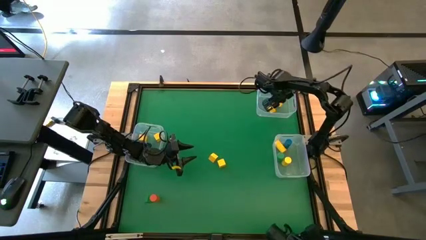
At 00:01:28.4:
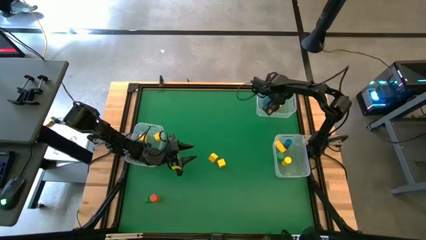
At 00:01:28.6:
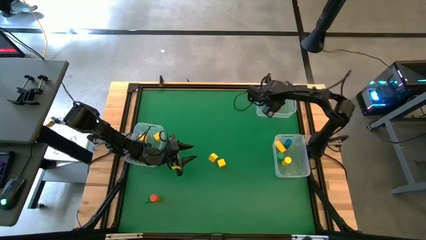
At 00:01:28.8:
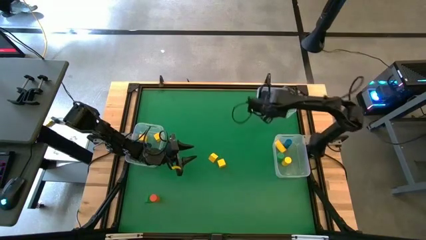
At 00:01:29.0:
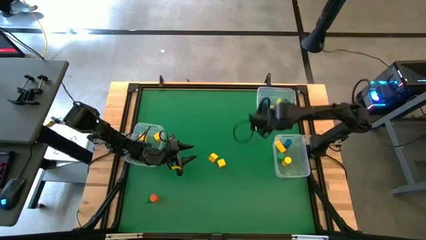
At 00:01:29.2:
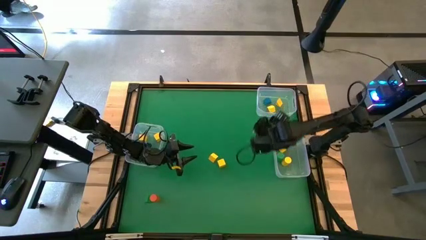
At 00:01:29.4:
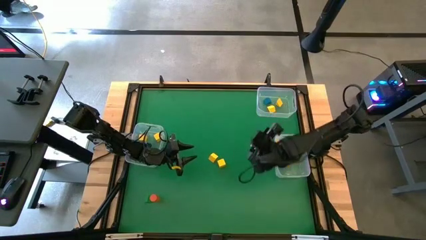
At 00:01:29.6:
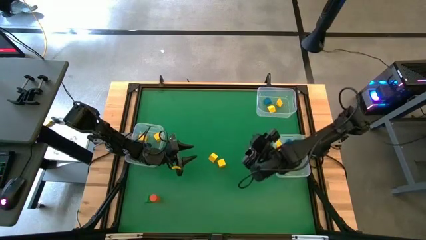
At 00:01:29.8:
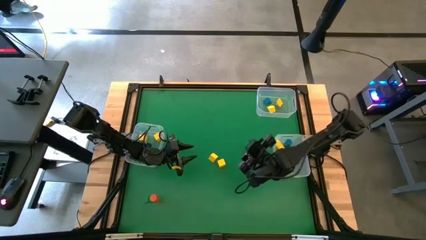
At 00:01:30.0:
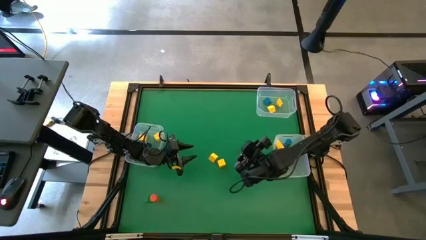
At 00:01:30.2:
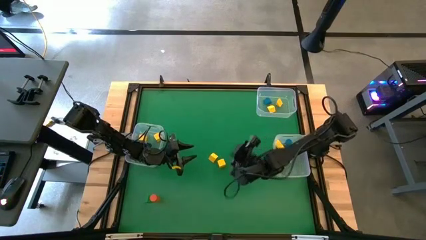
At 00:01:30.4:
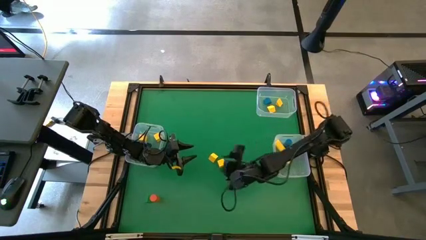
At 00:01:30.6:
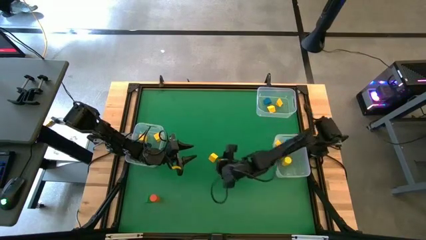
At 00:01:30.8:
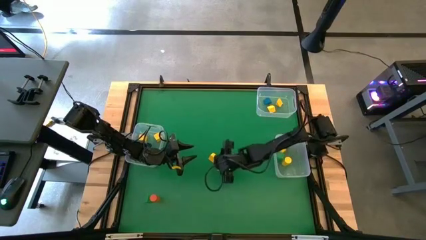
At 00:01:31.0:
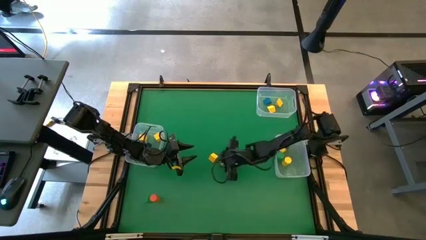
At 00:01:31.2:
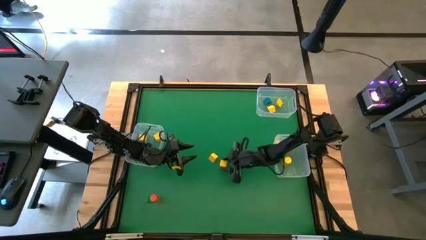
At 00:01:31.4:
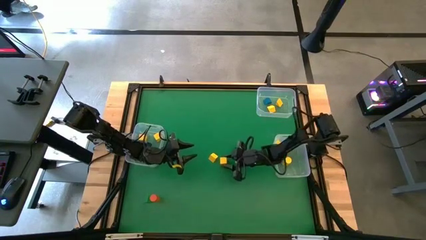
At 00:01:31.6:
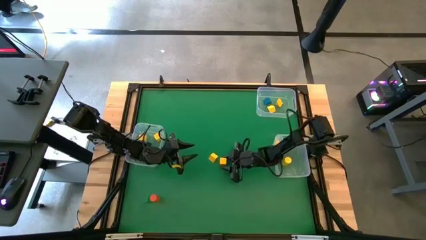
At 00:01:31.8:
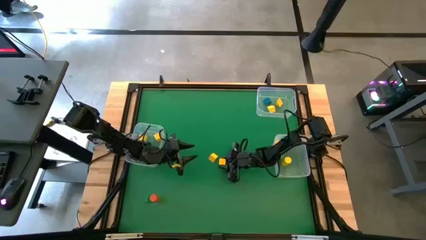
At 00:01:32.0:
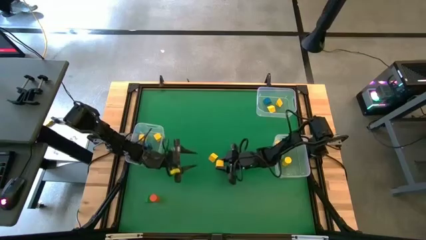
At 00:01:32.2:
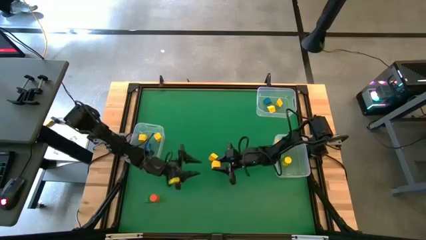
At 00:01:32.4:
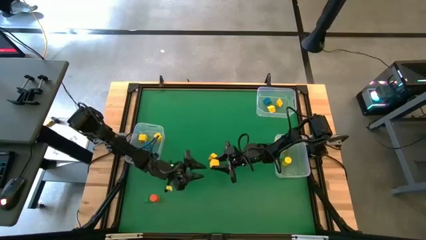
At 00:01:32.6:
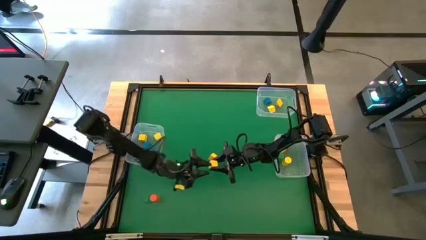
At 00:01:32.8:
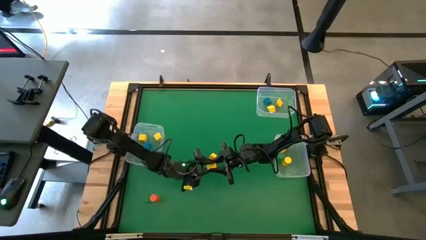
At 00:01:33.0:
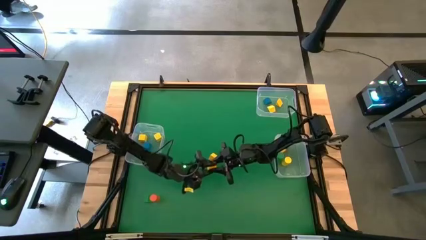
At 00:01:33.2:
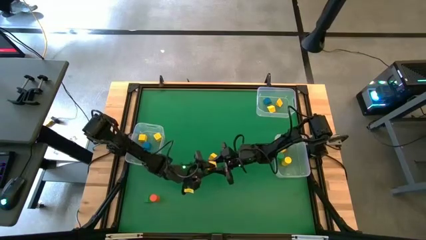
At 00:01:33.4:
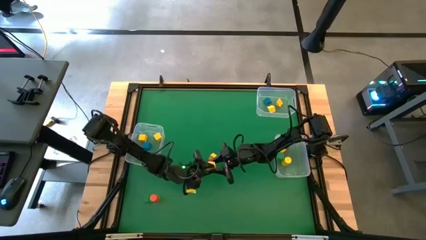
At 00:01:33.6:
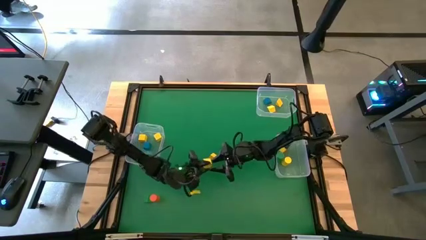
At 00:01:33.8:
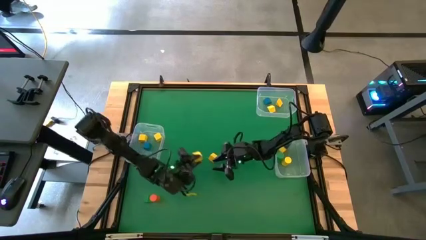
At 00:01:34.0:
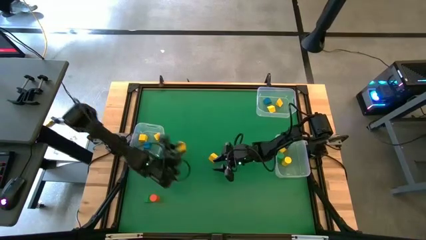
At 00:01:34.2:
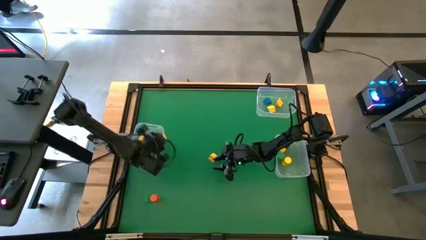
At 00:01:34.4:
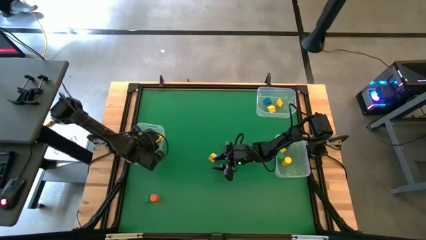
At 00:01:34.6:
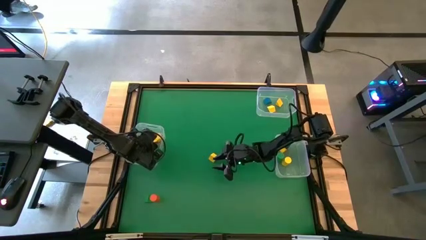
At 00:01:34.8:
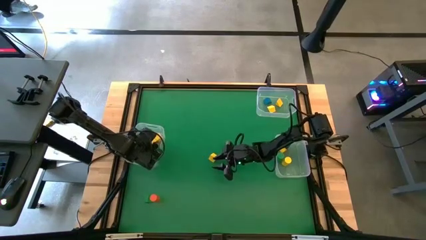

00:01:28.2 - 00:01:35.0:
Task: Sort blocks by size
Put the yellow square block into the left transparent bin

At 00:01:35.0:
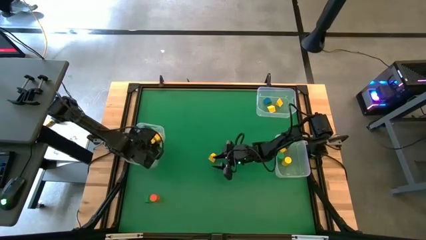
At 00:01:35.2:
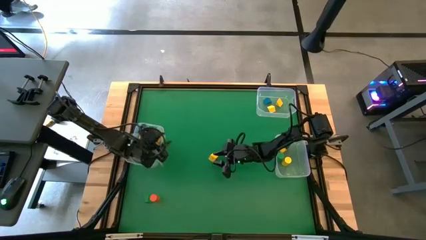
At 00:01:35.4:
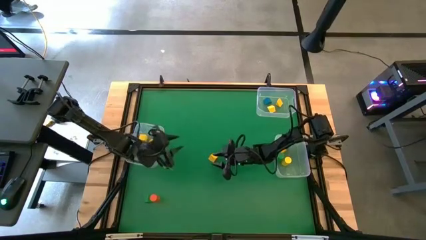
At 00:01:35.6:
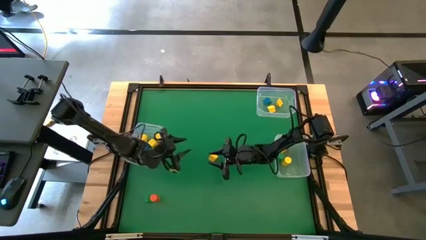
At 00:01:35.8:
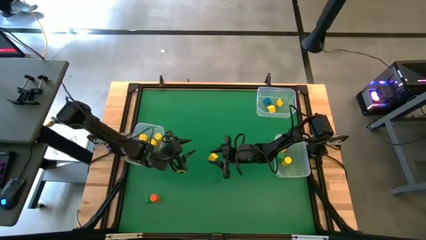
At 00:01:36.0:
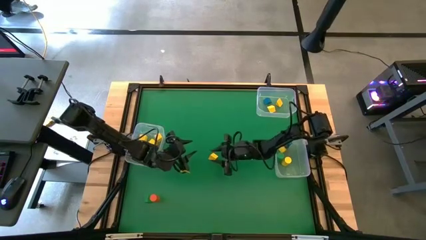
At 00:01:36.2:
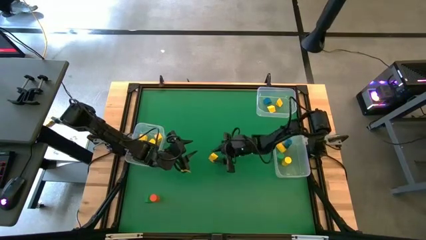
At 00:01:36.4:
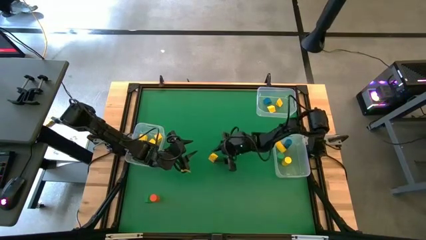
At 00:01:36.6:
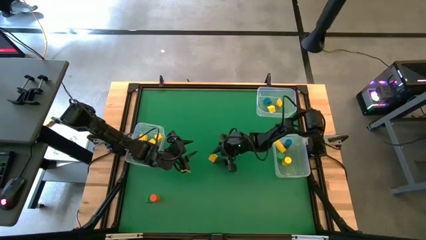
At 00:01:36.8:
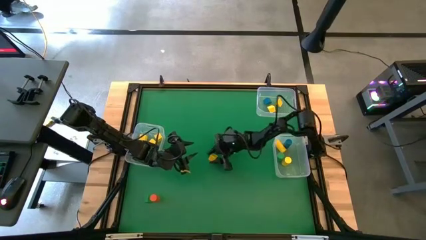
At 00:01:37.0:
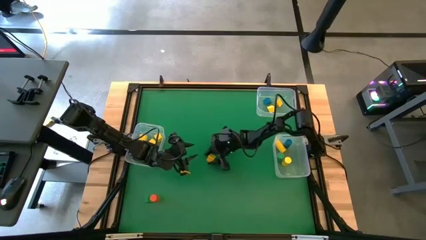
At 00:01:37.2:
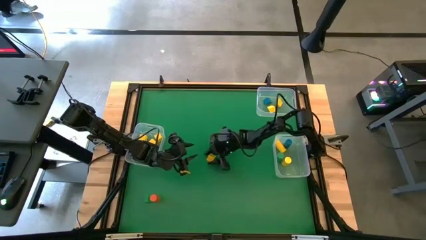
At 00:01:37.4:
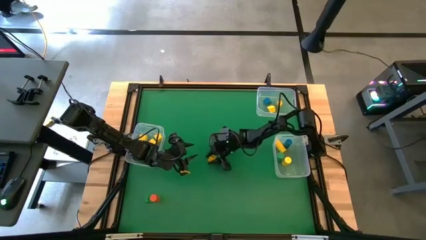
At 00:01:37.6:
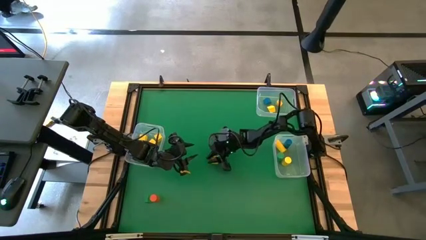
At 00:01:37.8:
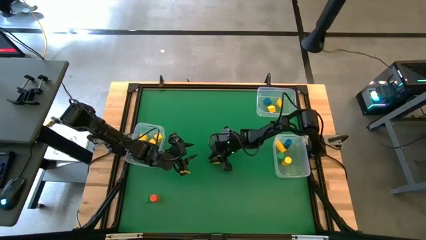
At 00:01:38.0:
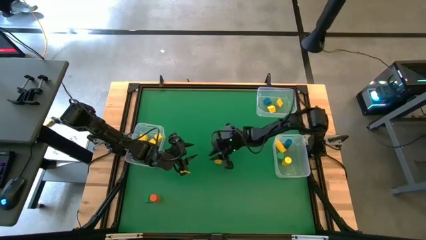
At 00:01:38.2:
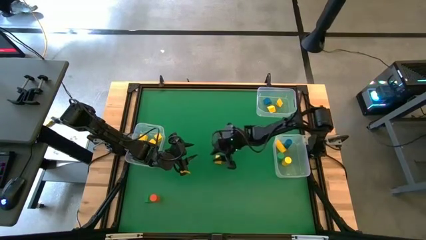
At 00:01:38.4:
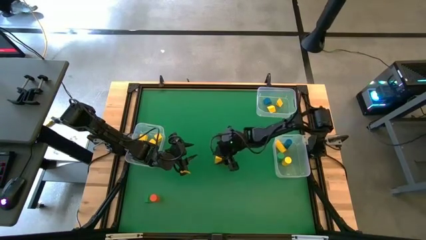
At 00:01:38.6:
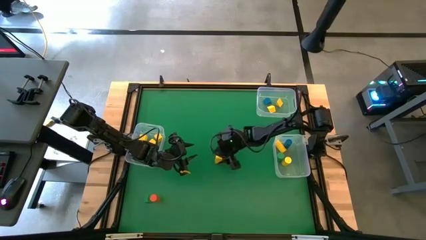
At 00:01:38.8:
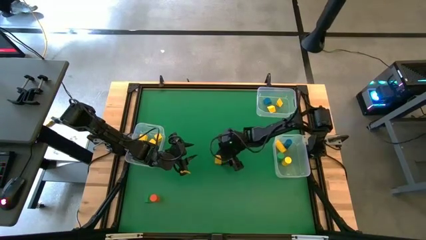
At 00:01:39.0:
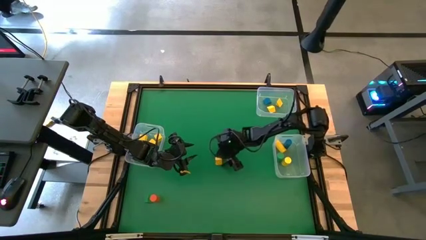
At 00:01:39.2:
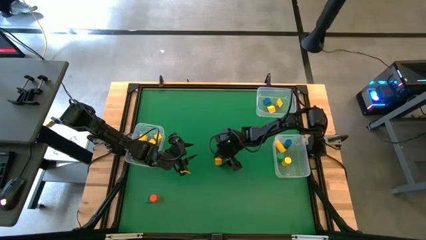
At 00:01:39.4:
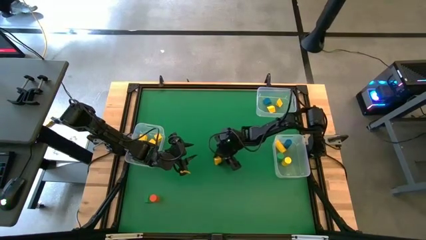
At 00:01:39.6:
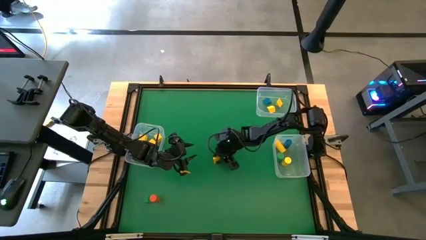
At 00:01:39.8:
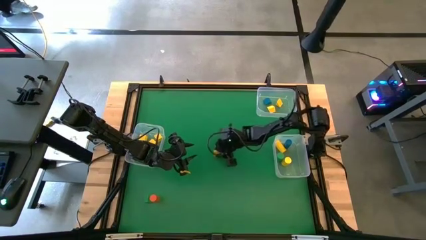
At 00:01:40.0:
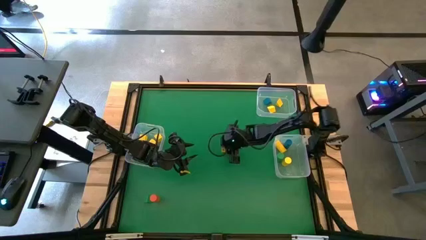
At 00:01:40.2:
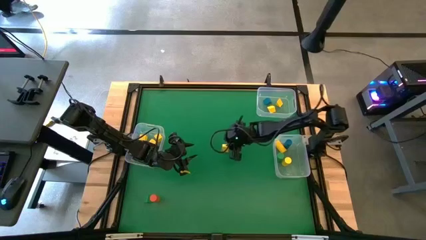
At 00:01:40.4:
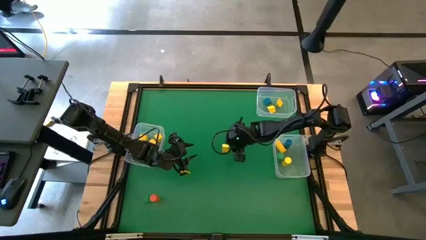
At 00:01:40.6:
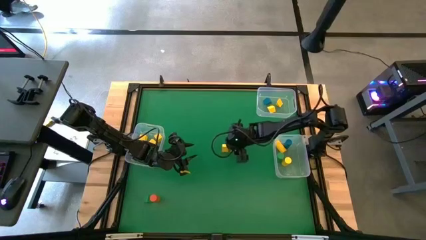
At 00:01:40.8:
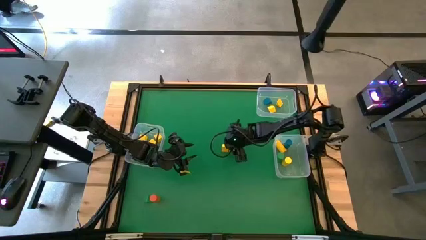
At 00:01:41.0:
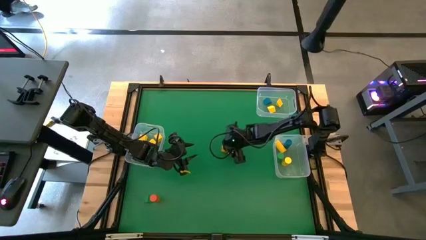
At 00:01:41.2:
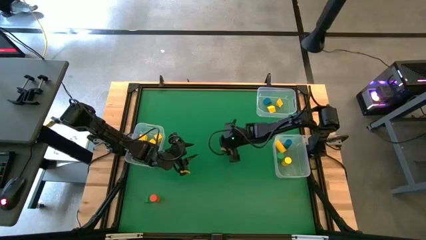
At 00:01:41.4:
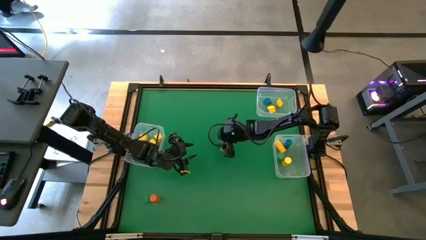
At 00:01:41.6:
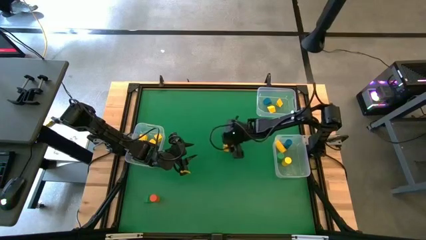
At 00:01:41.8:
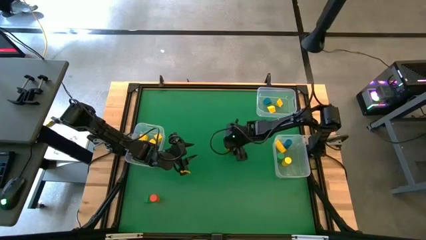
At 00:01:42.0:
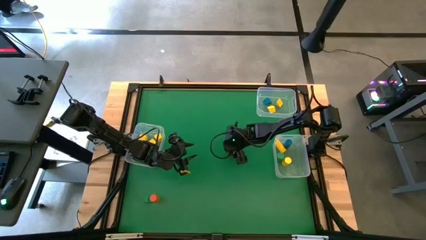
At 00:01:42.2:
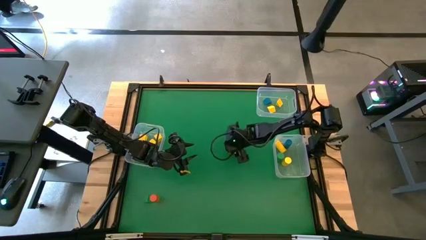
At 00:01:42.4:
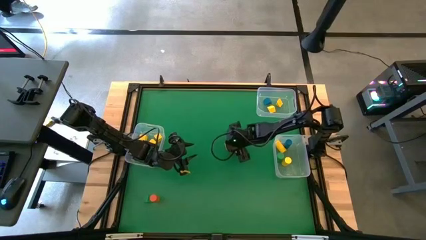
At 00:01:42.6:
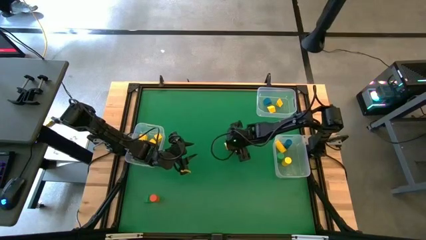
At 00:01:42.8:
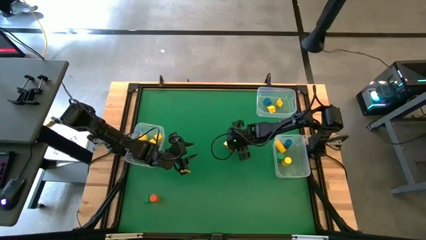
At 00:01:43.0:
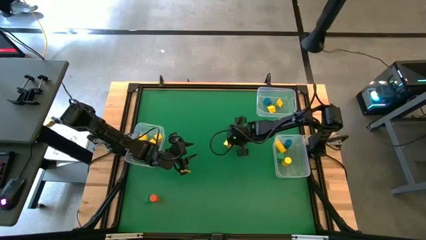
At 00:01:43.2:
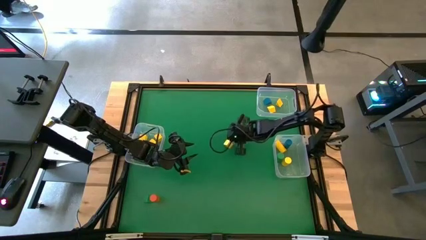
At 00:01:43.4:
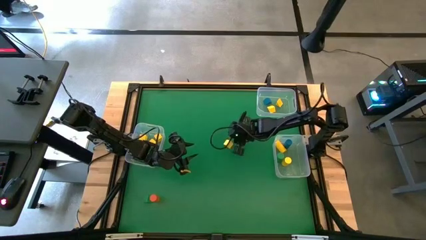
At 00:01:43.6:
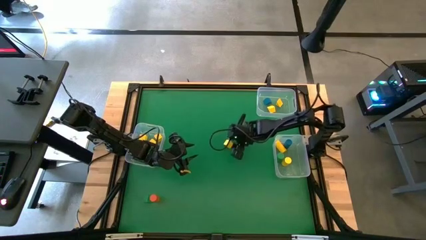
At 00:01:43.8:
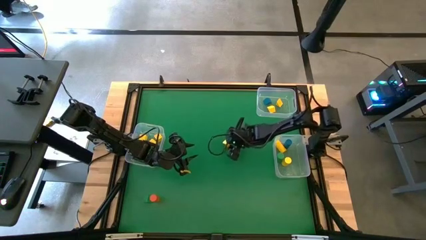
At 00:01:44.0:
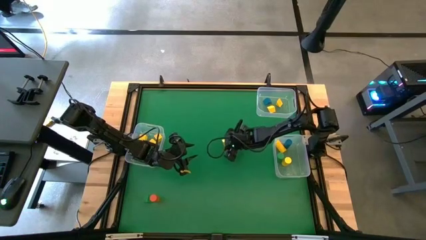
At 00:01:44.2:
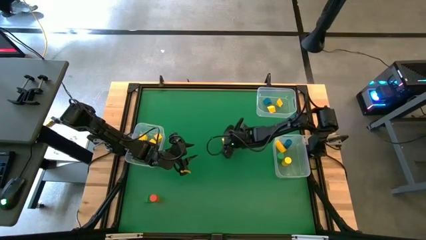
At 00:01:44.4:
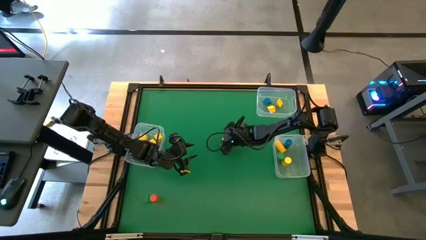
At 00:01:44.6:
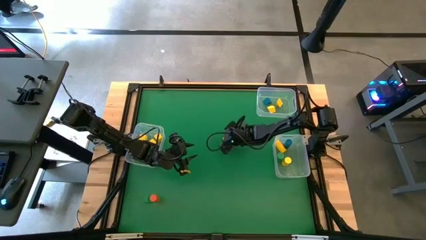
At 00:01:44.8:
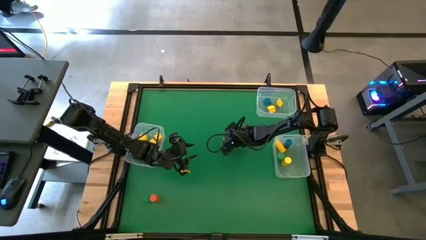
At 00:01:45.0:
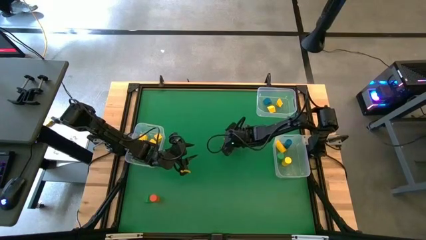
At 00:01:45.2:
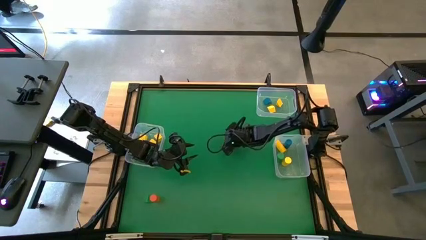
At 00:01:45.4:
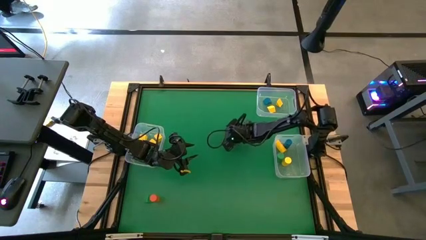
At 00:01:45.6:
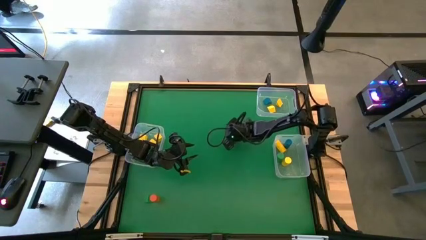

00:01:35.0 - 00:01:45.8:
Put the yellow triangle block into the top transparent bin

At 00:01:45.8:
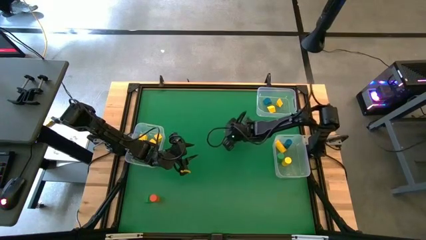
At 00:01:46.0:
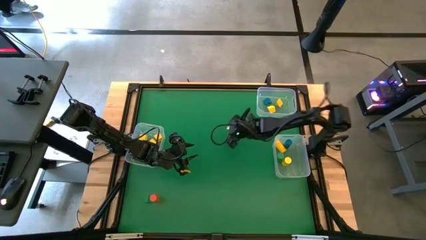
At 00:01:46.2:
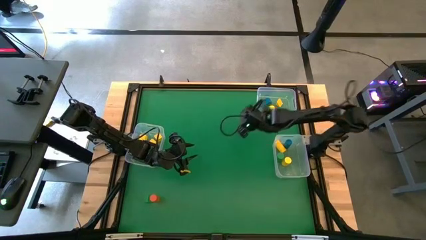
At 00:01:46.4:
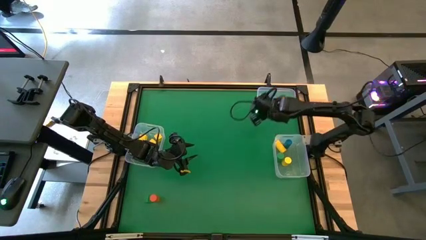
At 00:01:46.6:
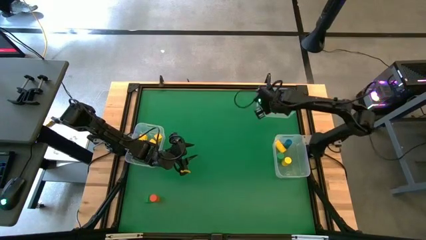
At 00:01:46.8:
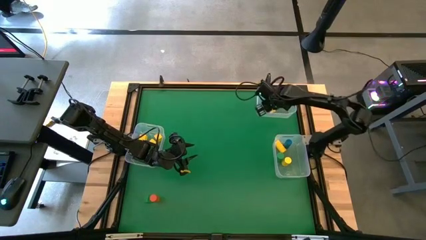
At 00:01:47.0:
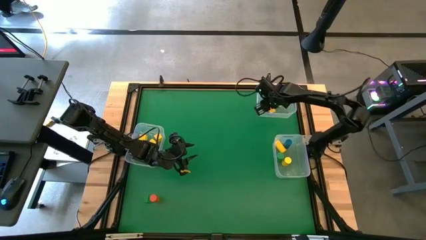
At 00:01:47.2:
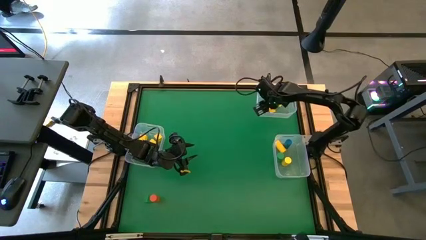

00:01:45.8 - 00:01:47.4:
Put the yellow triangle block into the top transparent bin
